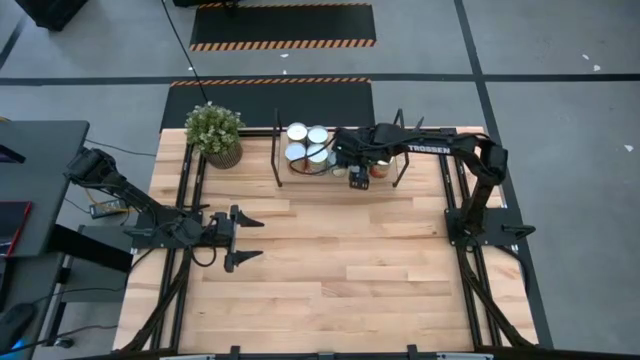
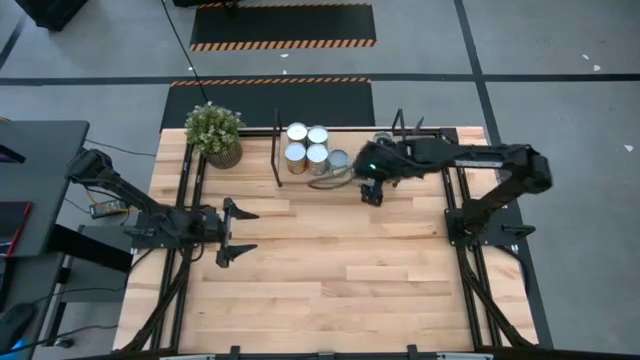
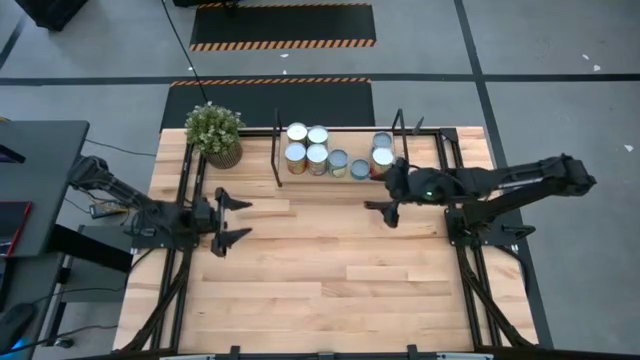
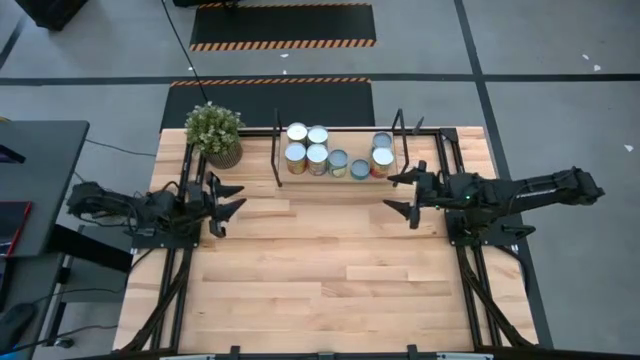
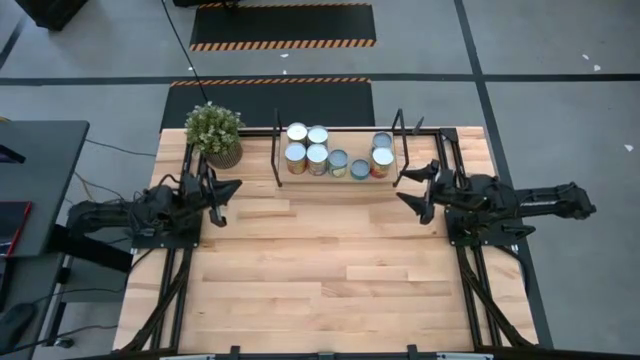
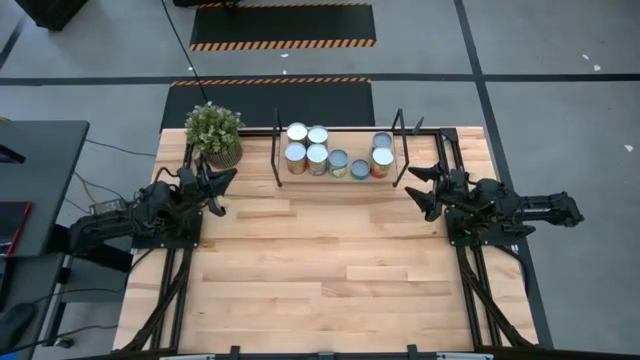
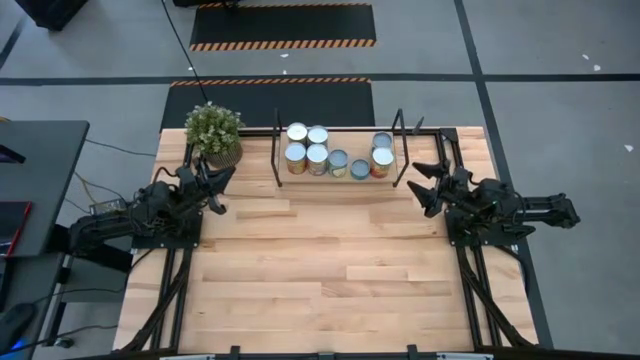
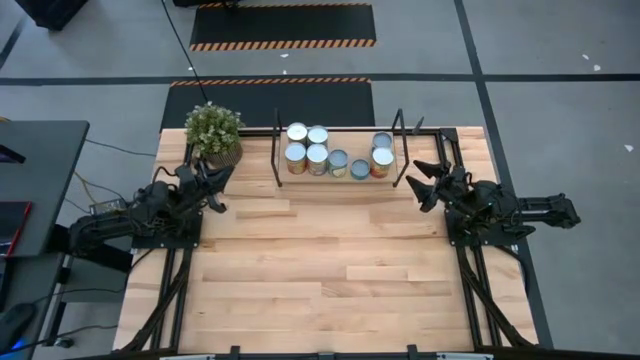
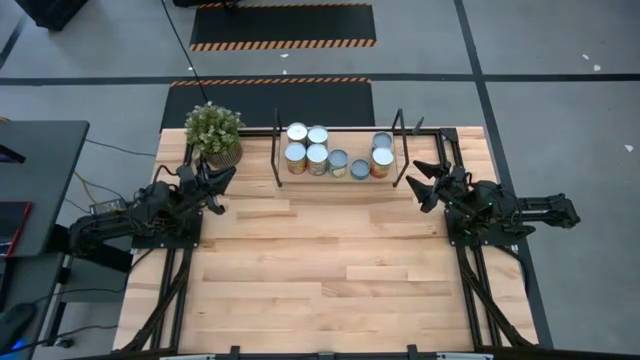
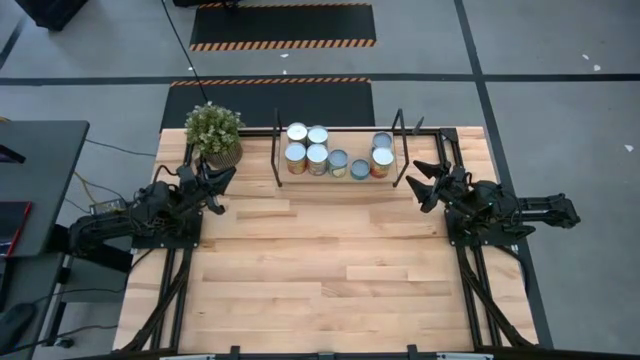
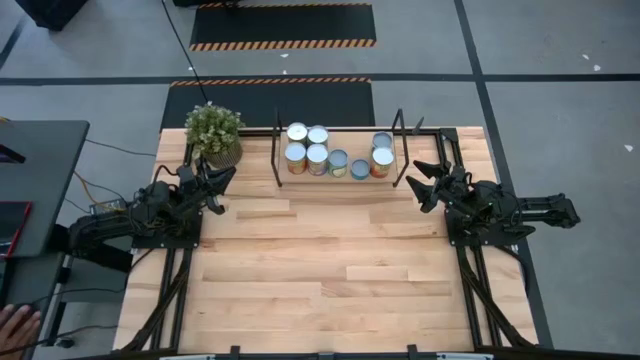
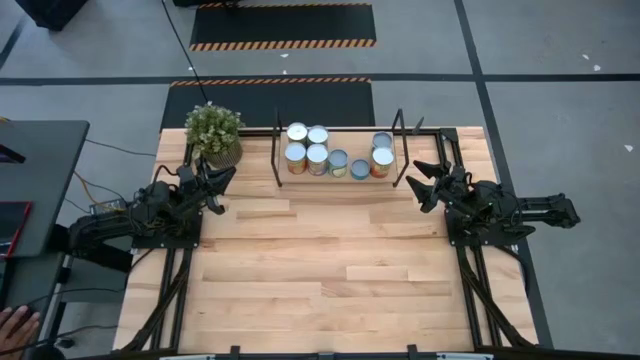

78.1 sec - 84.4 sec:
Task: Pick and place cans onto a shelf
Return to Home Position

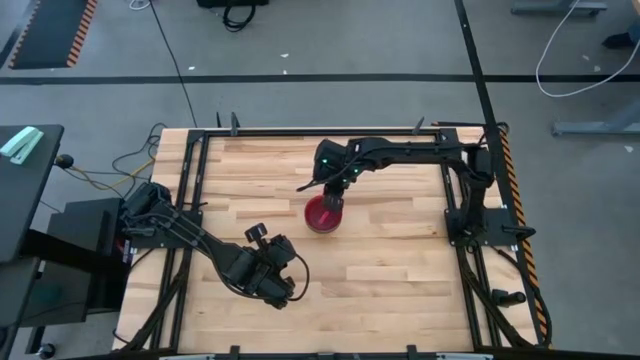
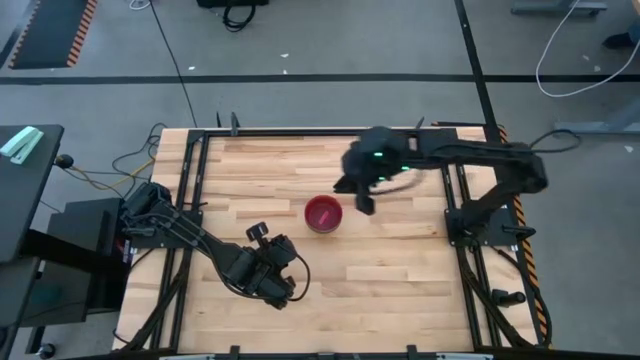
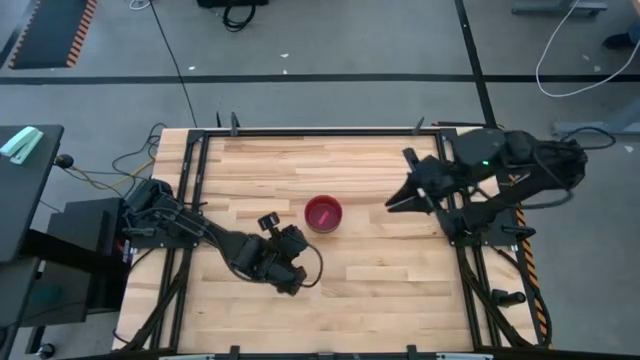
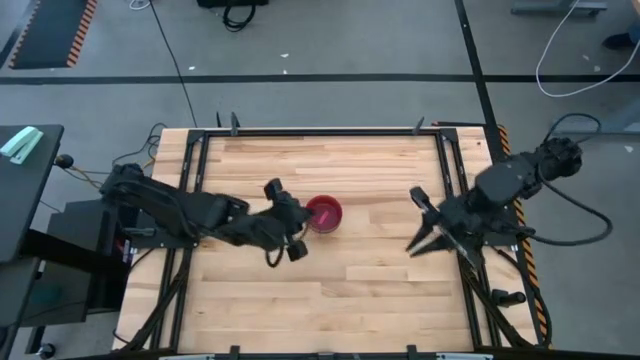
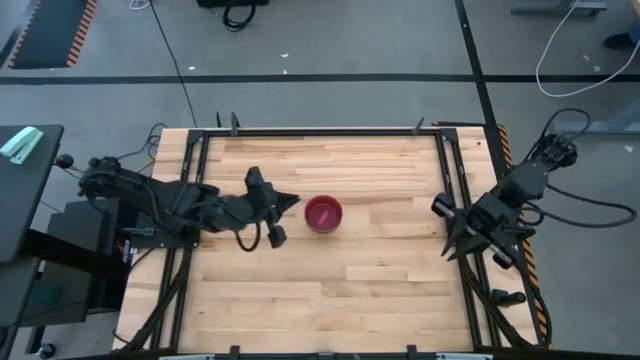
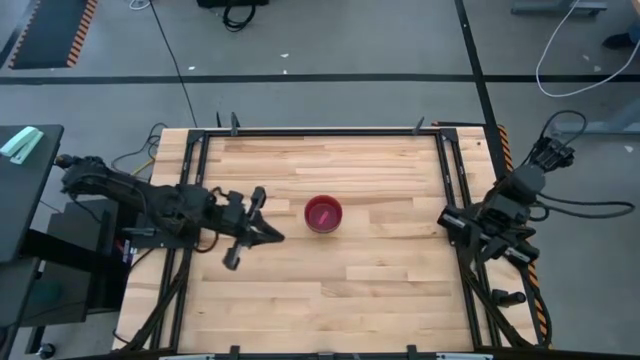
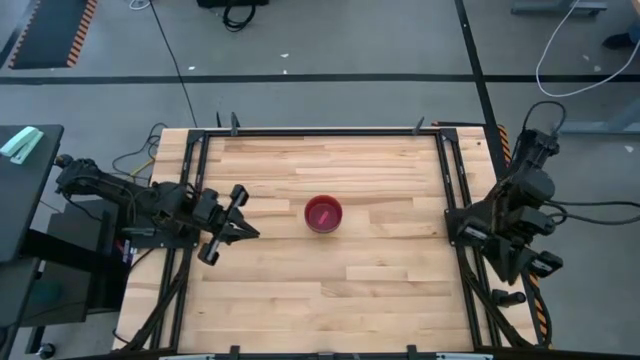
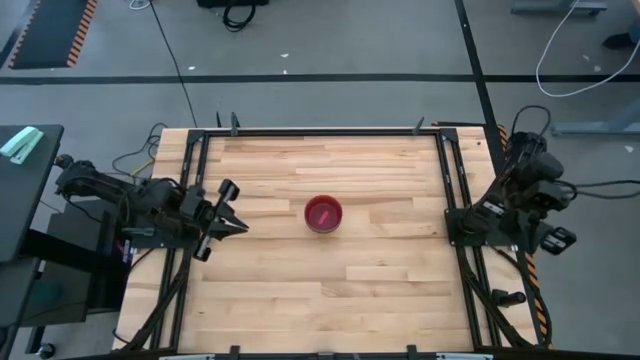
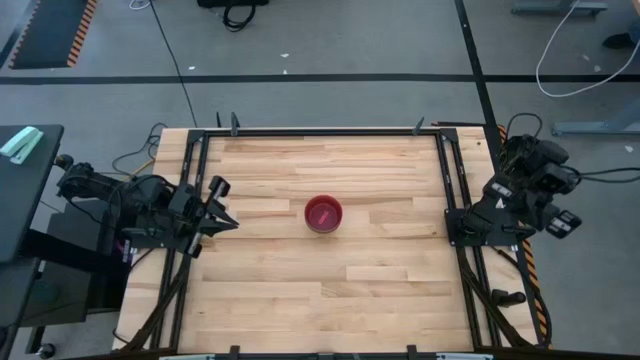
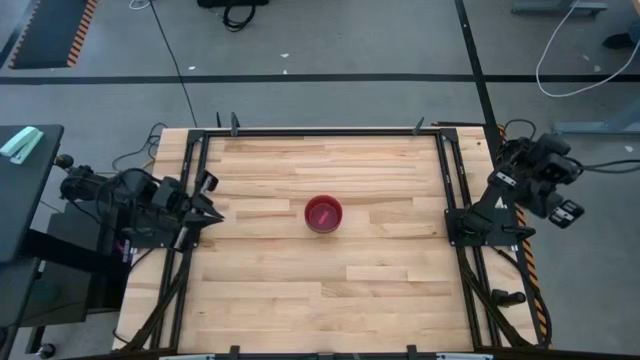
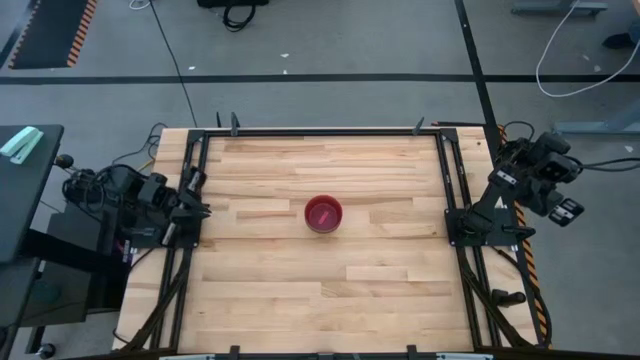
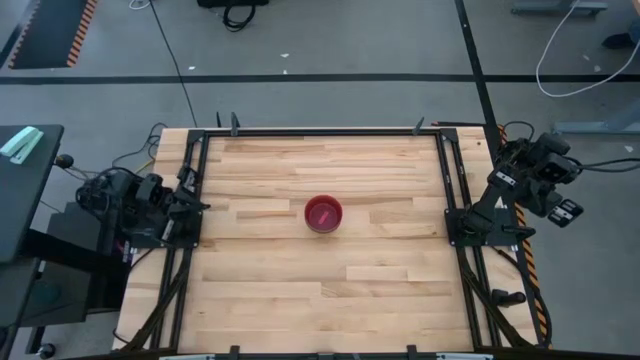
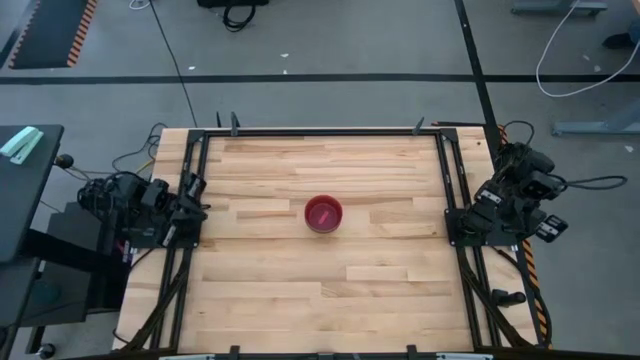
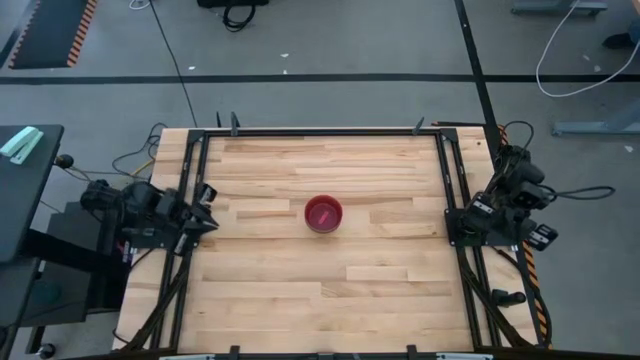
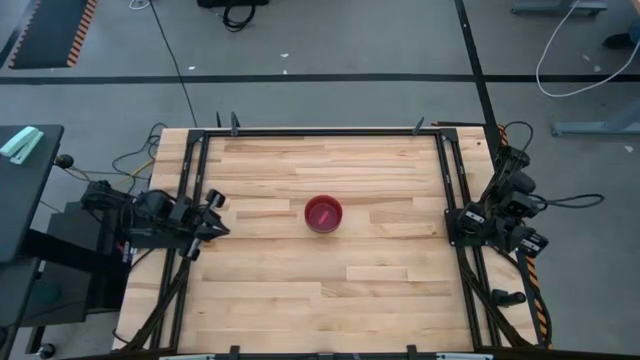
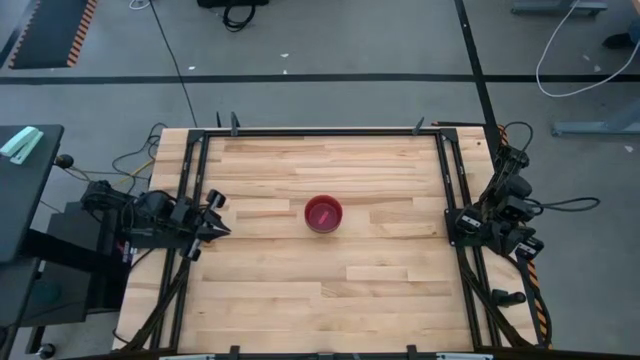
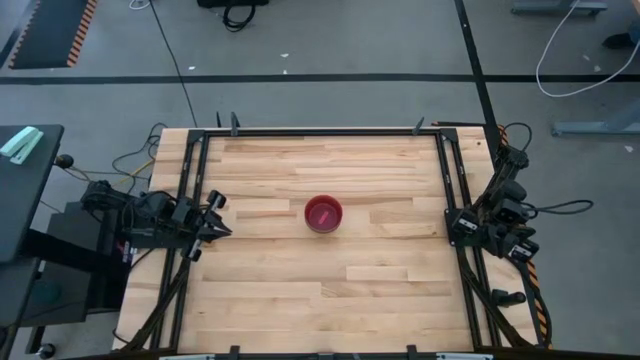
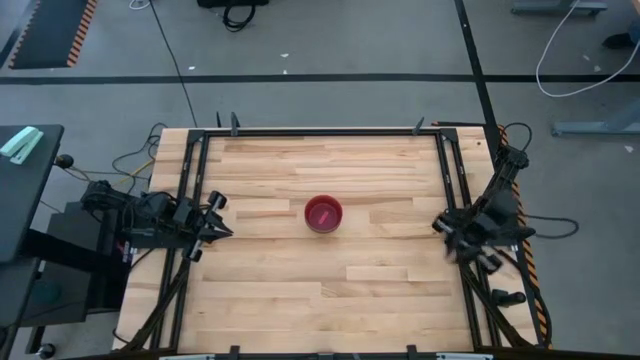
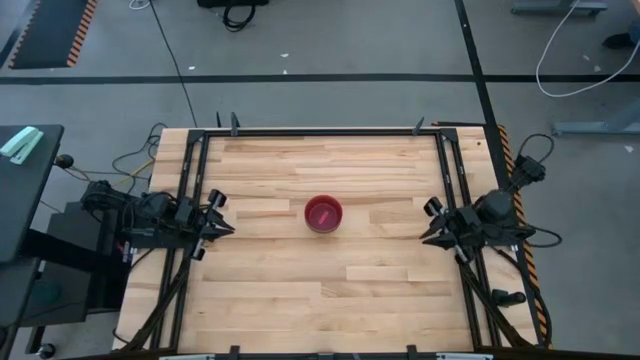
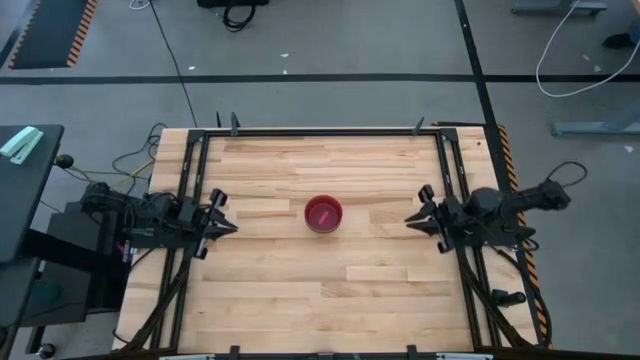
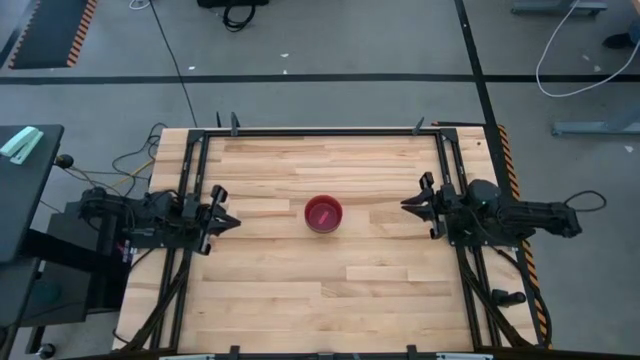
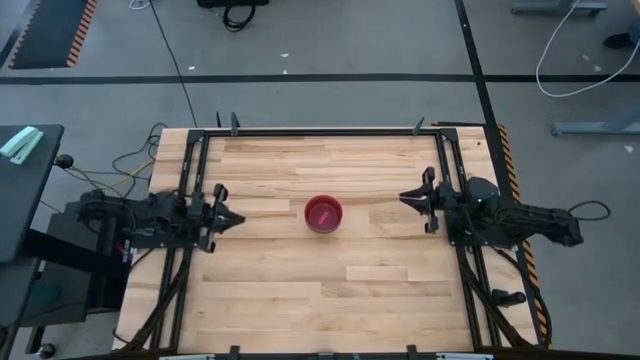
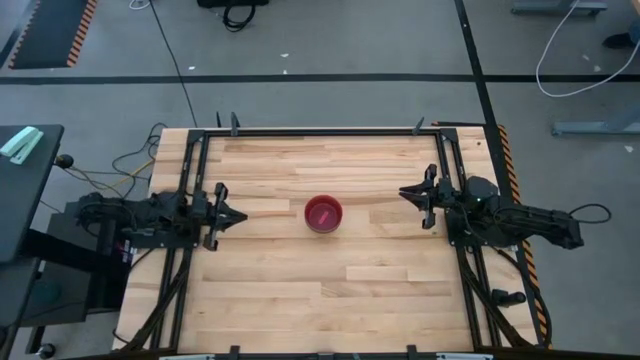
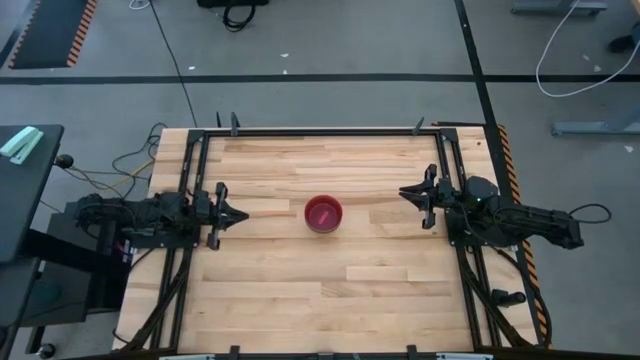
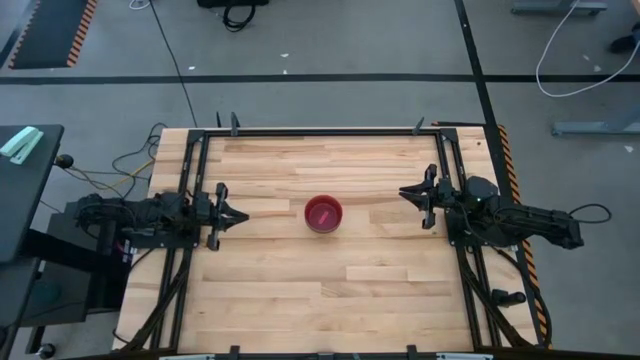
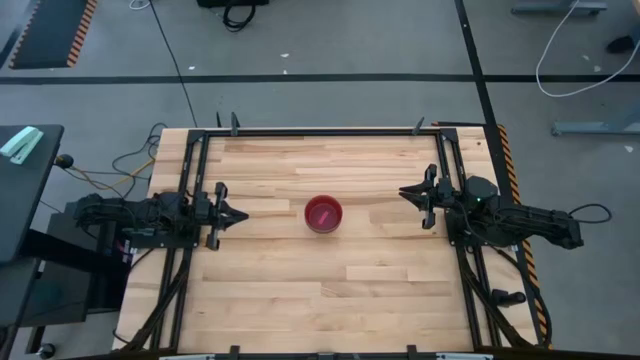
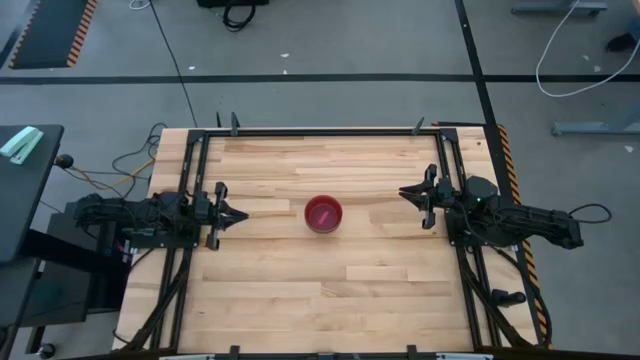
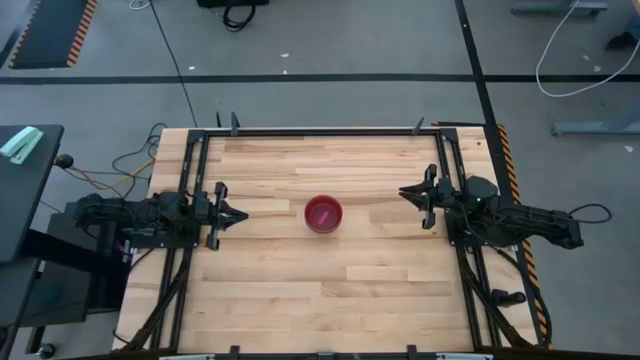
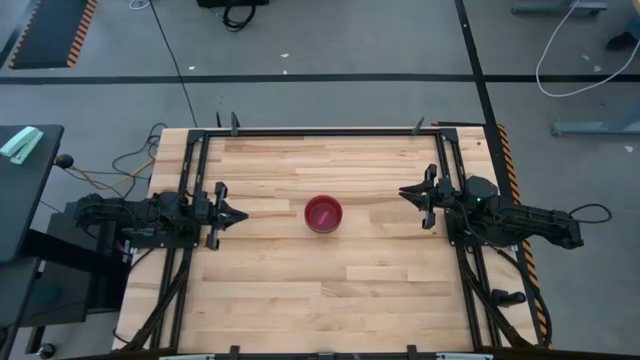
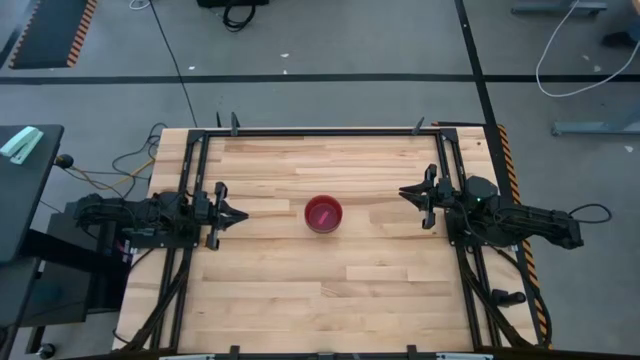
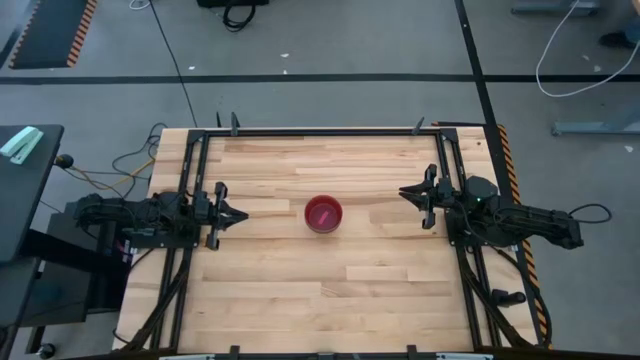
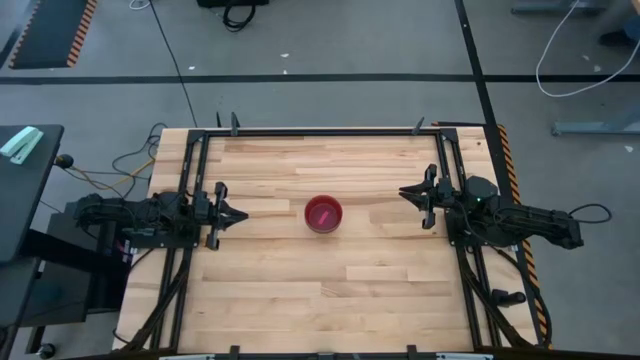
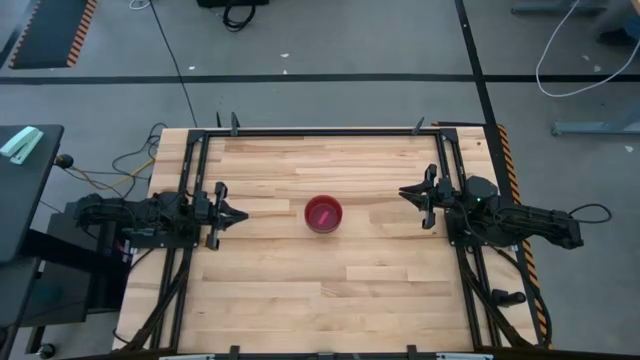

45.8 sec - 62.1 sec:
Task: Nest bowls inside each other
Return to Home Position
